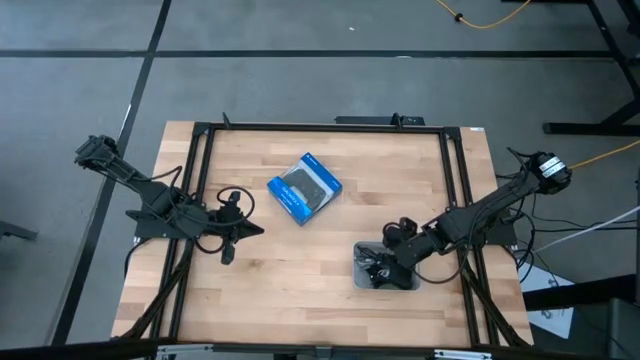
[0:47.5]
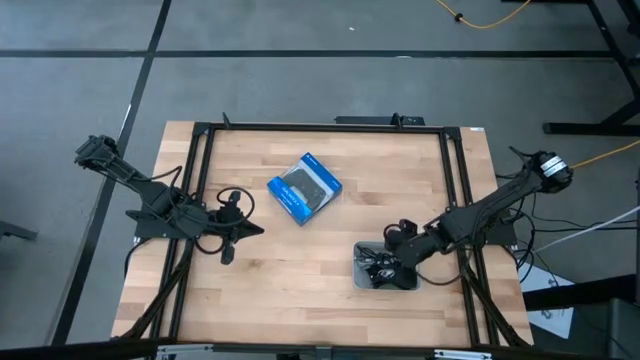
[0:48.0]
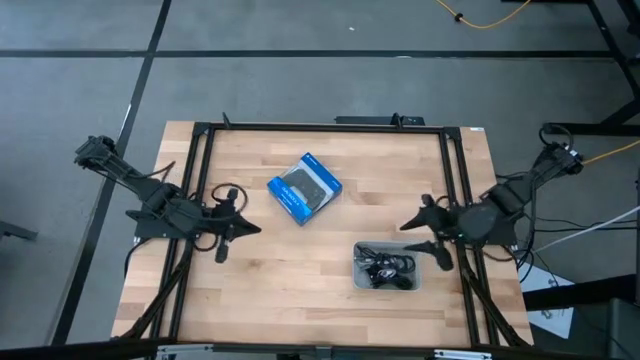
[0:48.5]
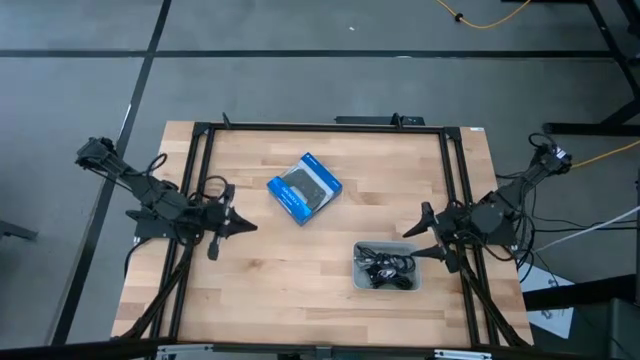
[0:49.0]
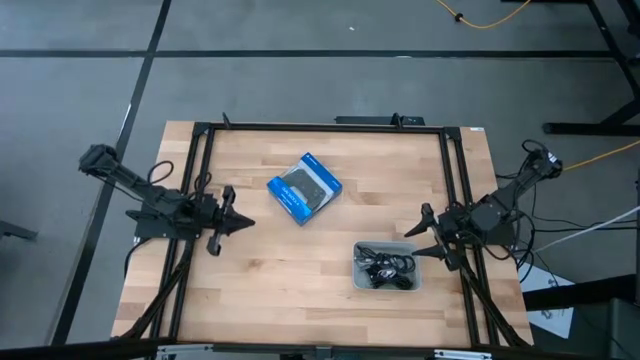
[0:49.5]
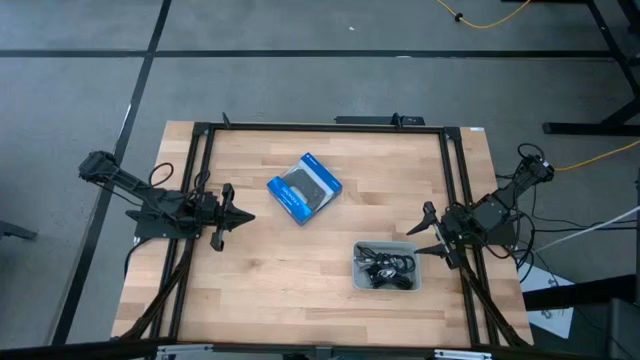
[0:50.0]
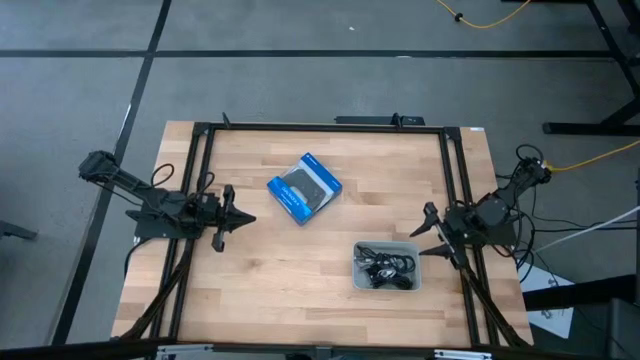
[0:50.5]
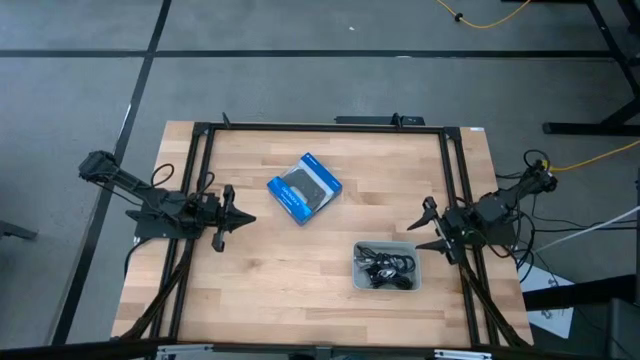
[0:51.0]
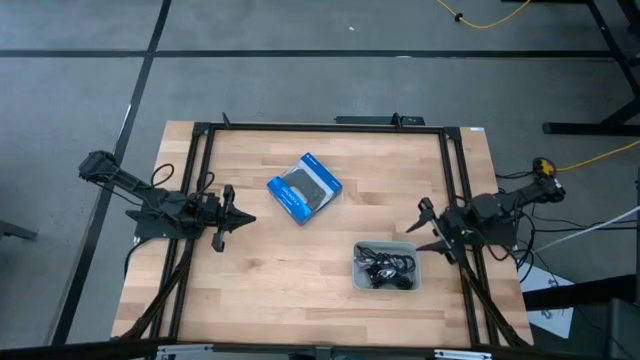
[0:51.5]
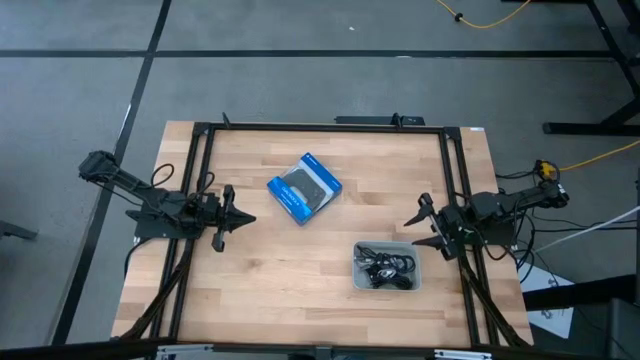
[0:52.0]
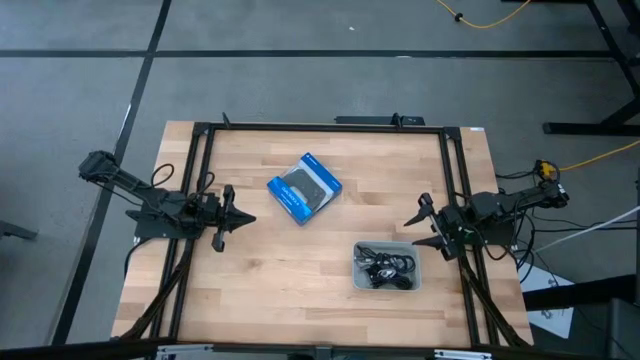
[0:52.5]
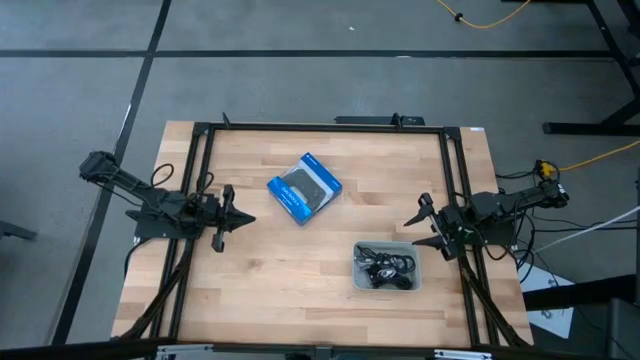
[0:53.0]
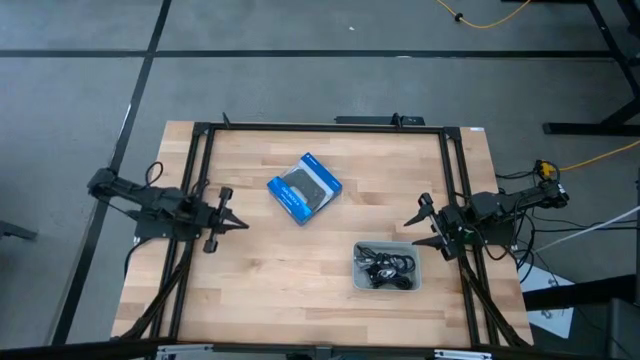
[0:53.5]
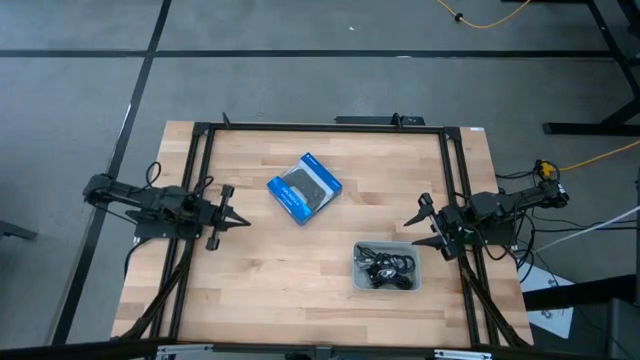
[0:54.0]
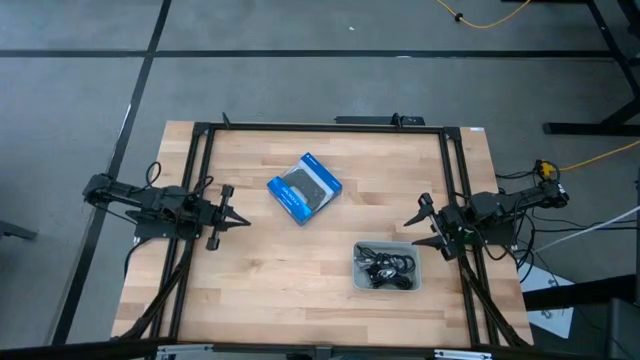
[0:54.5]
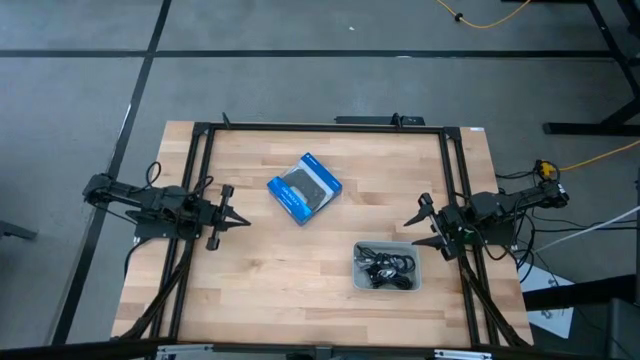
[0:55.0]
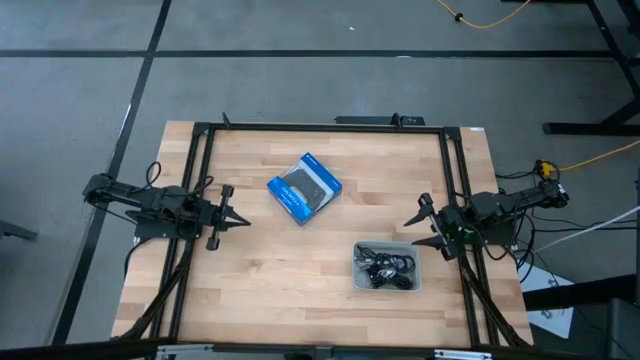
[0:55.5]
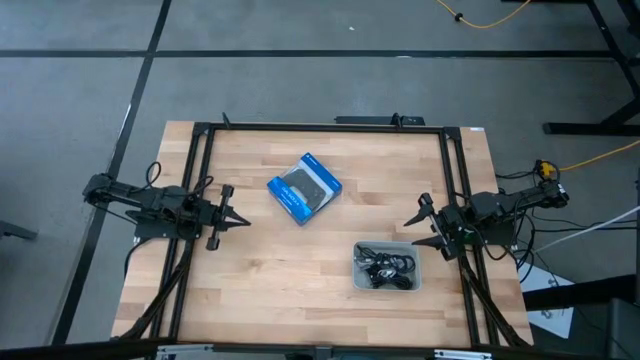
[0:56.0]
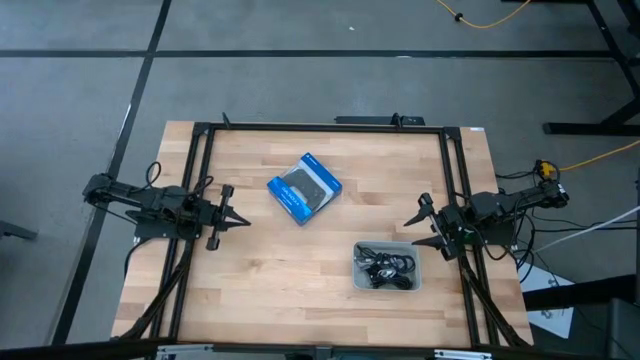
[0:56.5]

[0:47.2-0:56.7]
Task: Pick and place USB-C Cables
Return to Home Position

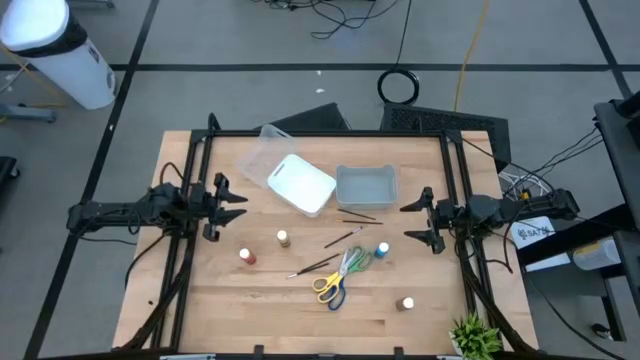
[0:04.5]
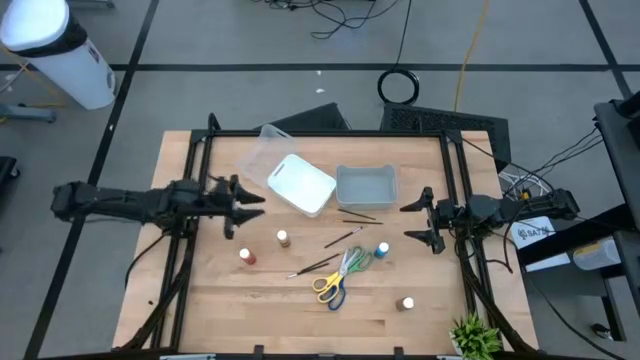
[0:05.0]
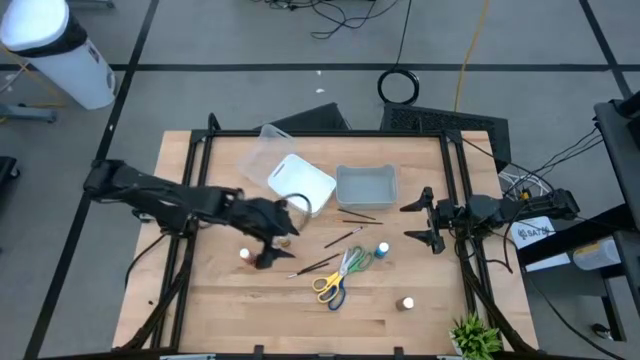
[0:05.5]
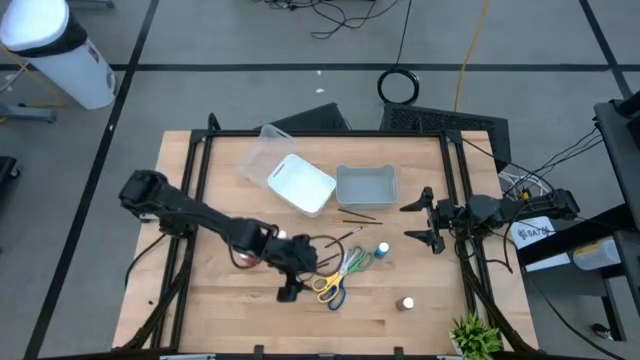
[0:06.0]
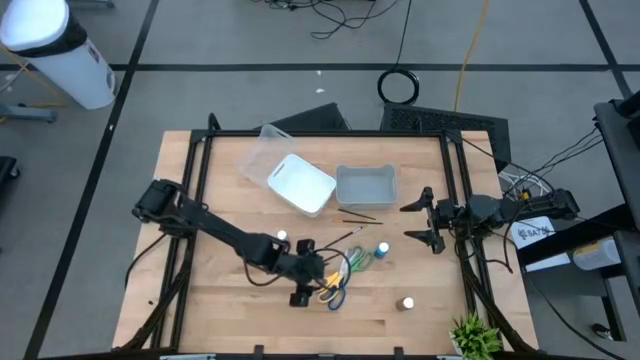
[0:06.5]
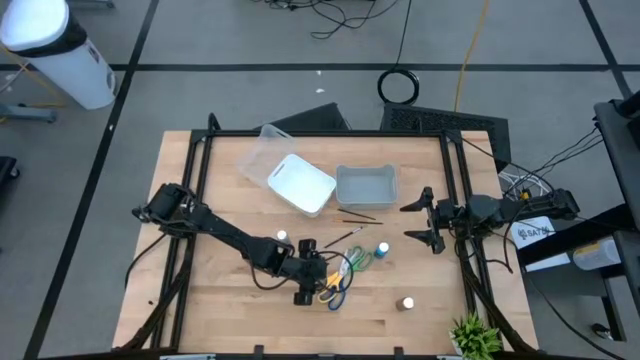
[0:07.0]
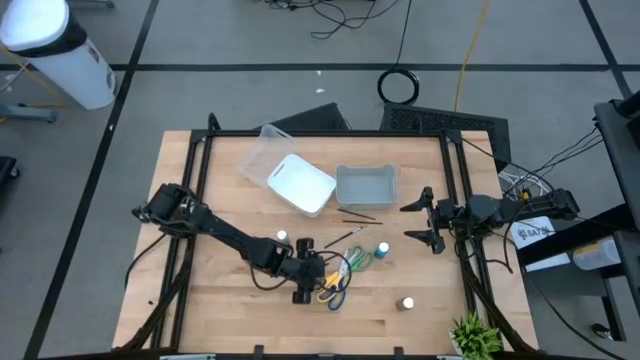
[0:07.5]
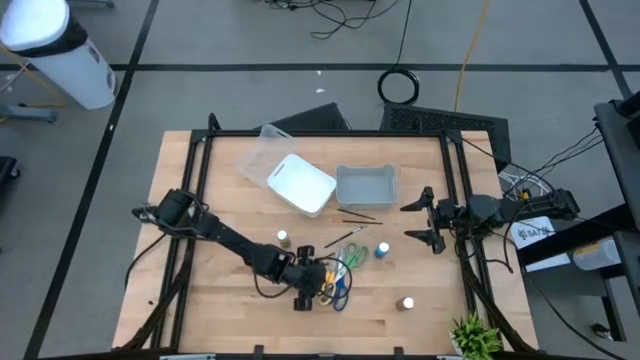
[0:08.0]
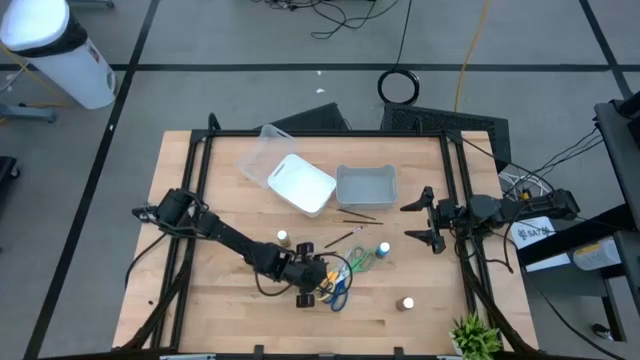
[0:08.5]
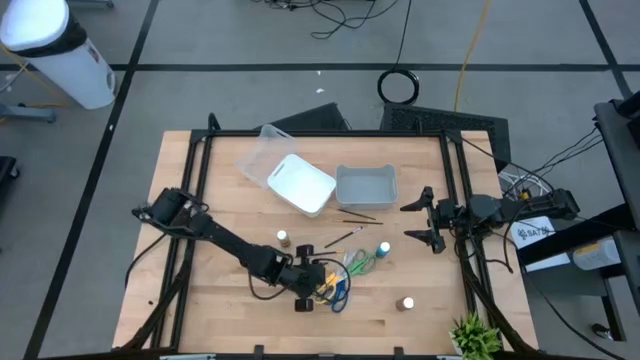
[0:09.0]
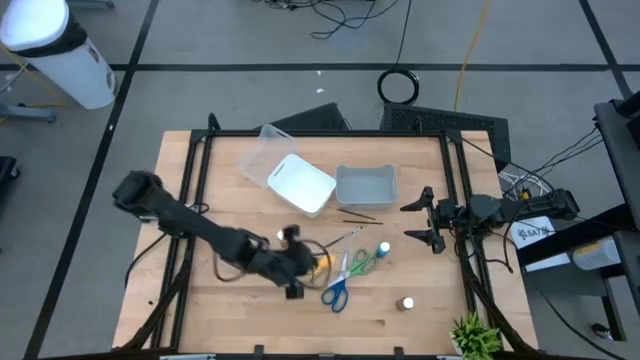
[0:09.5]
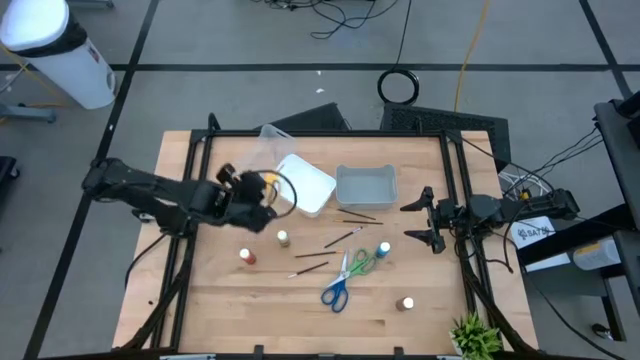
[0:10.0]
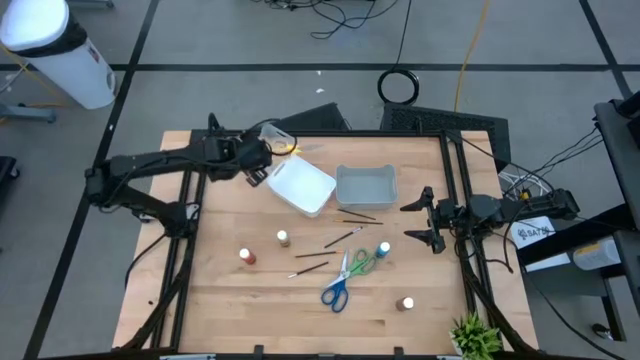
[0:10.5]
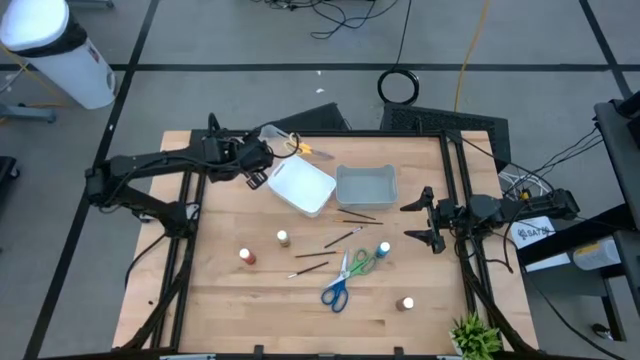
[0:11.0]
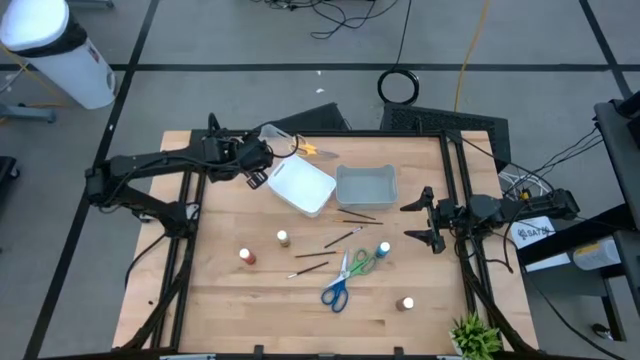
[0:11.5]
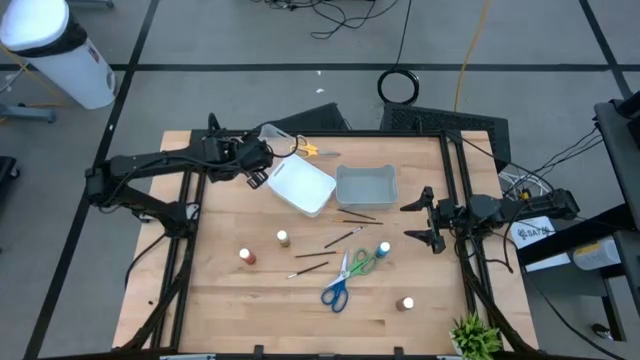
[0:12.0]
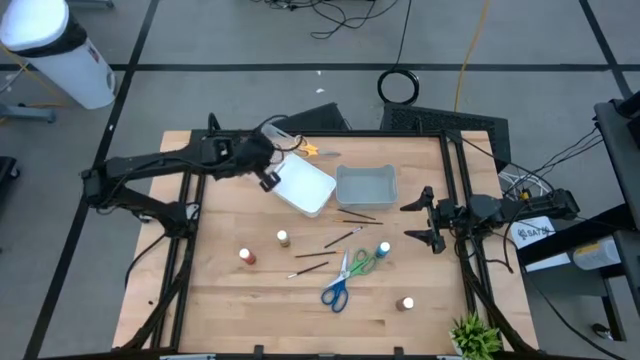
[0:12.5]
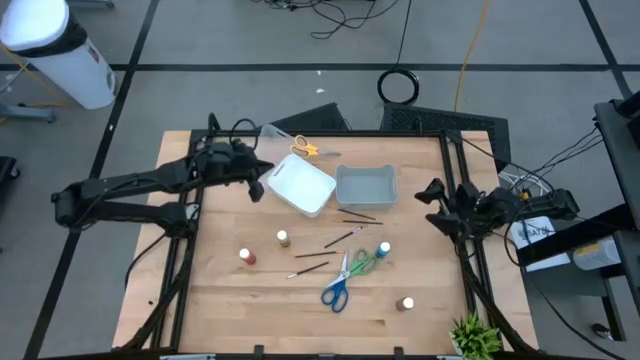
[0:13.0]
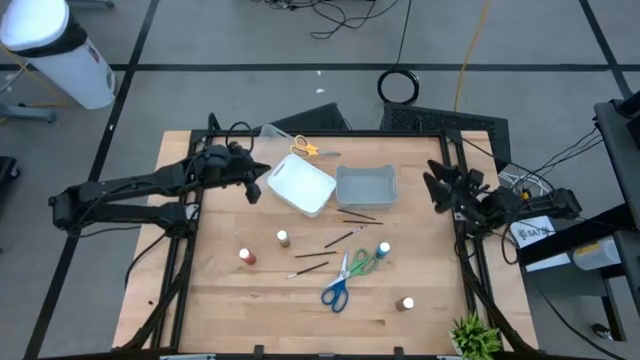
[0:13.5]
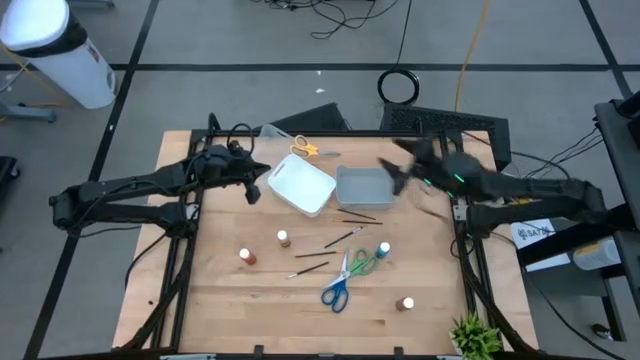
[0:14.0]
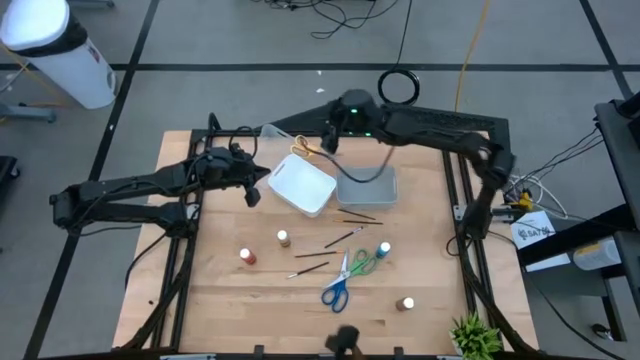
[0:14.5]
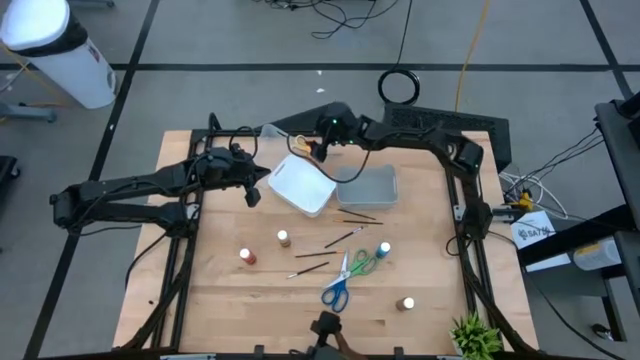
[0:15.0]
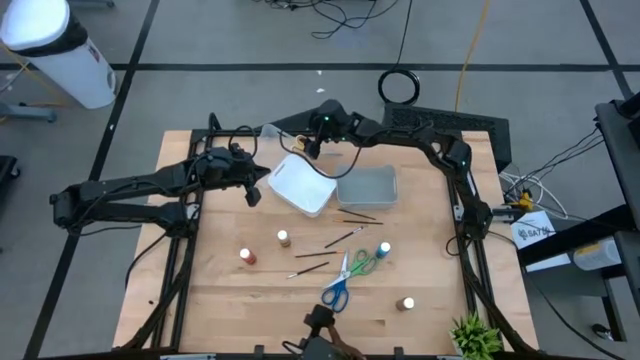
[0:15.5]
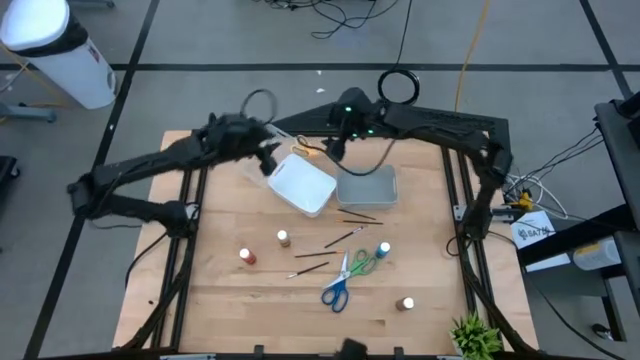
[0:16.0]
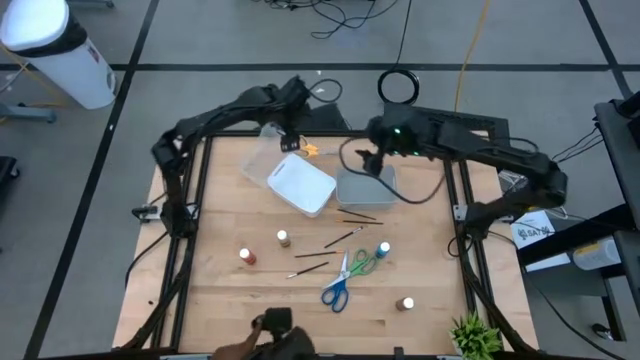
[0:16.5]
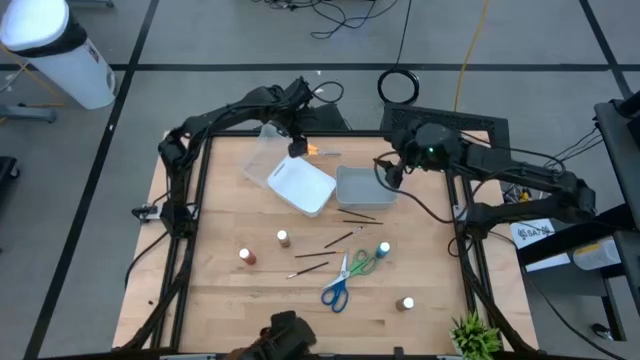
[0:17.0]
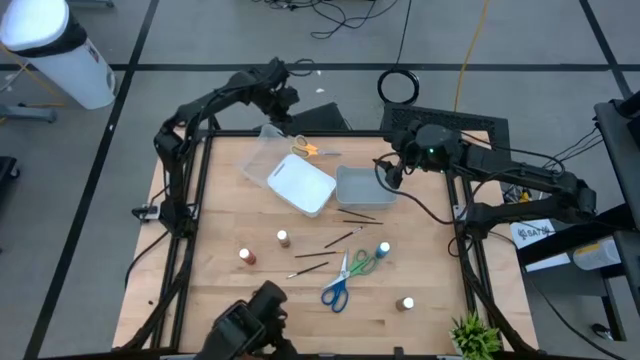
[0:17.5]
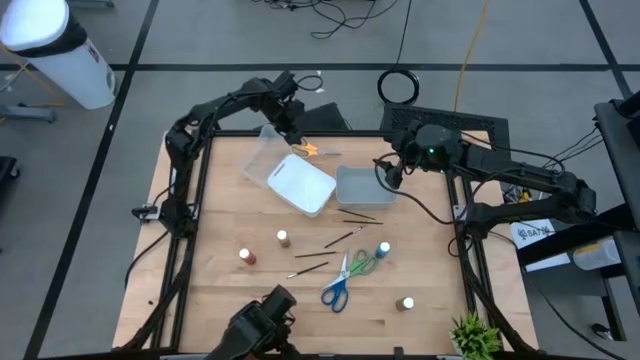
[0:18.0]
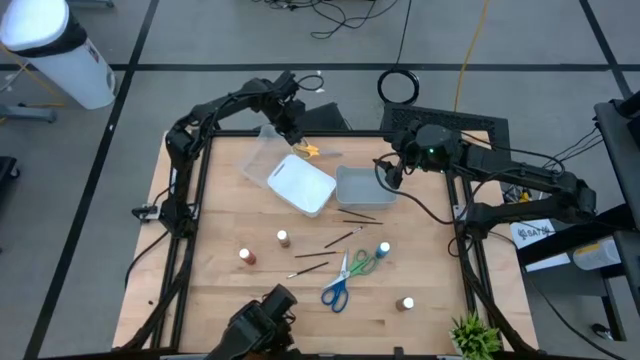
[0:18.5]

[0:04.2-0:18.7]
Task: Pick & Place Paint Supplies
Put the yellow scissors into the transparent bin
